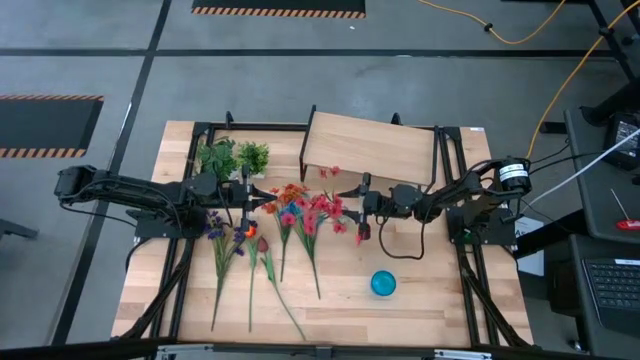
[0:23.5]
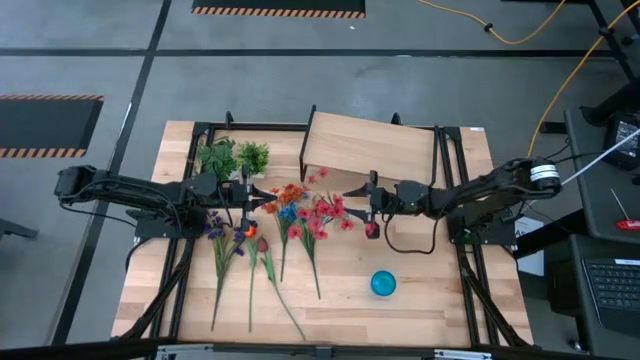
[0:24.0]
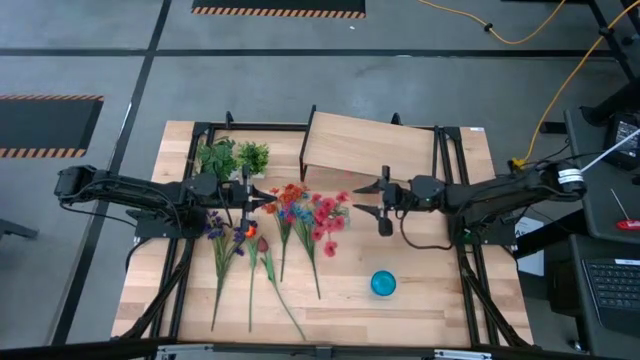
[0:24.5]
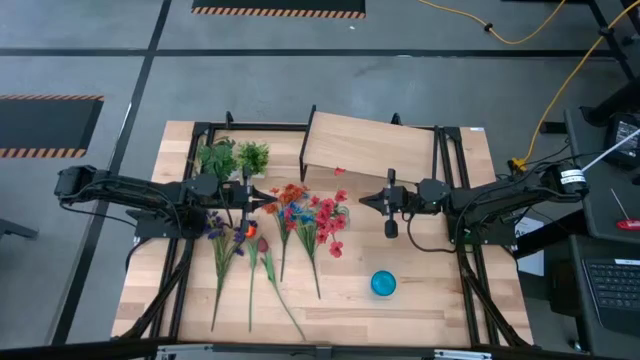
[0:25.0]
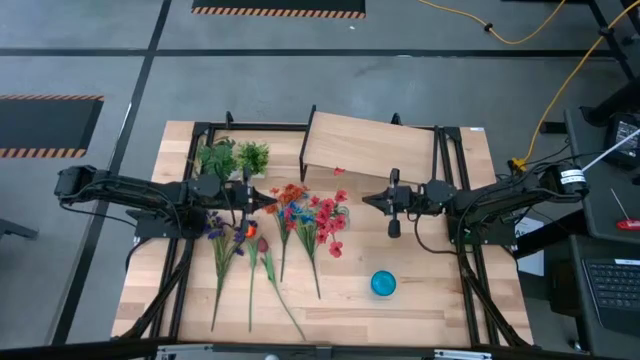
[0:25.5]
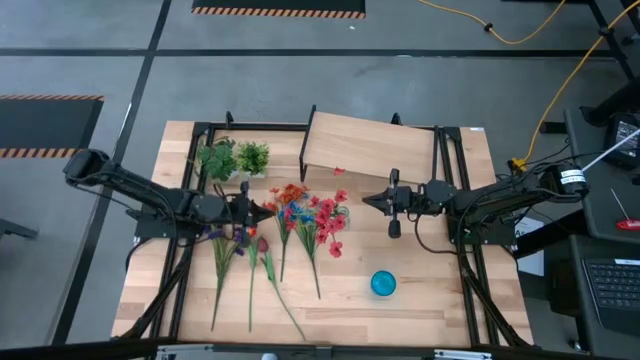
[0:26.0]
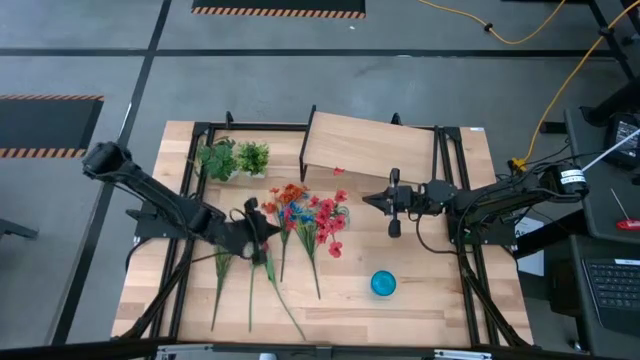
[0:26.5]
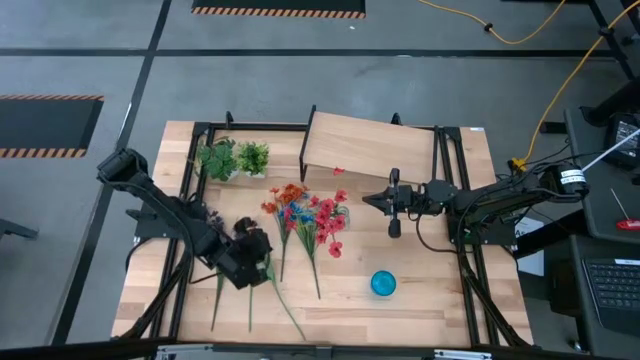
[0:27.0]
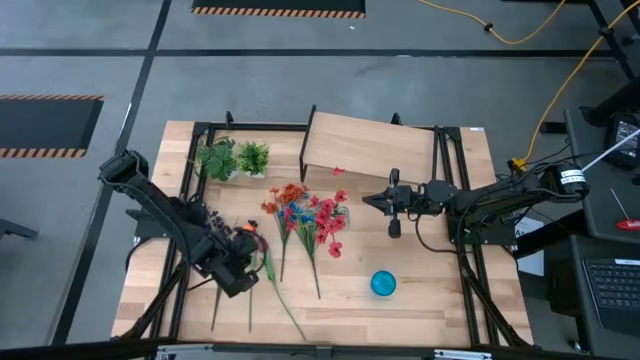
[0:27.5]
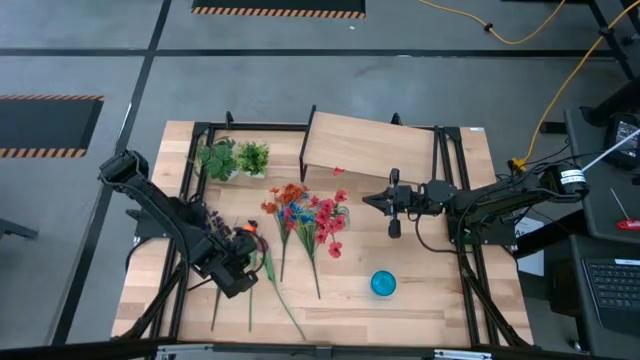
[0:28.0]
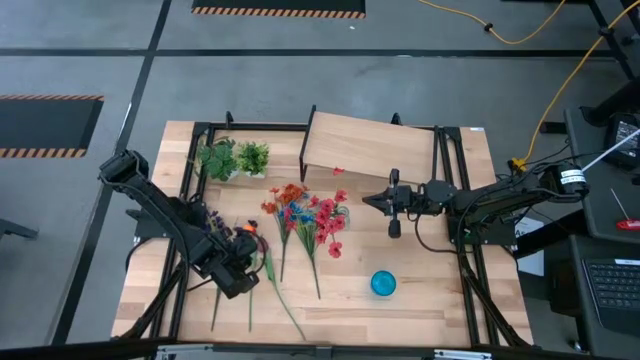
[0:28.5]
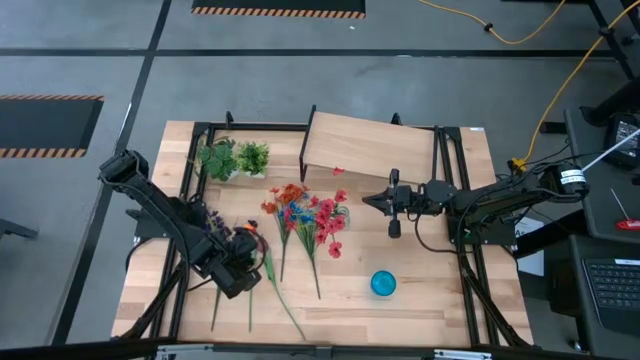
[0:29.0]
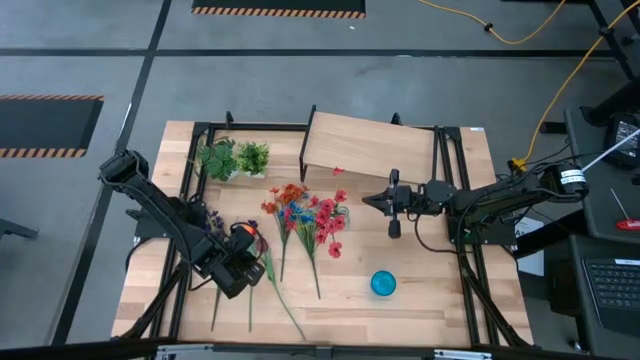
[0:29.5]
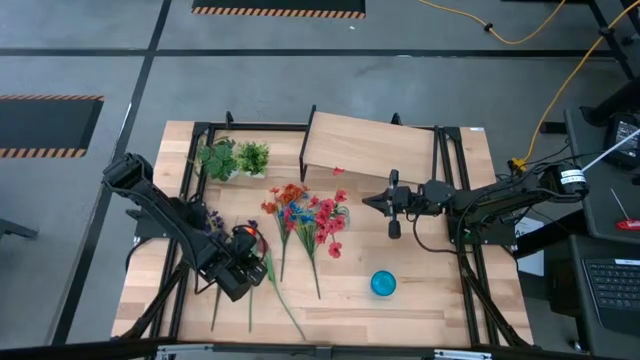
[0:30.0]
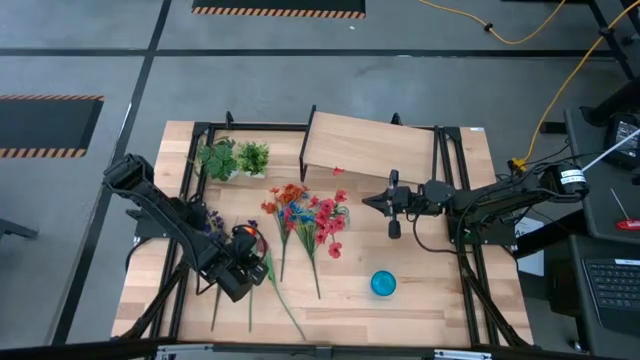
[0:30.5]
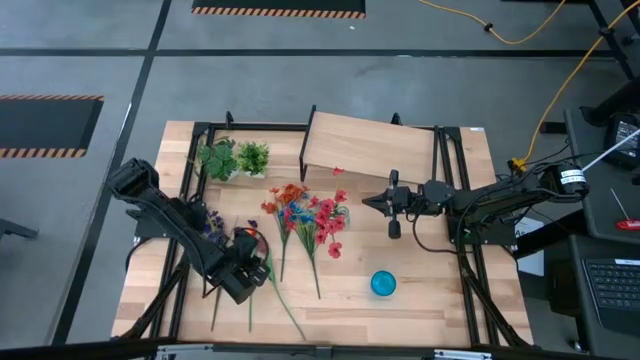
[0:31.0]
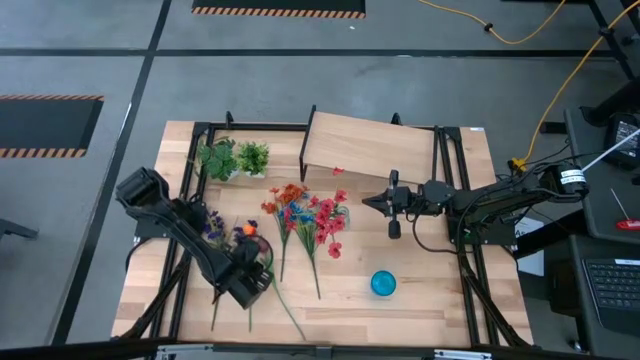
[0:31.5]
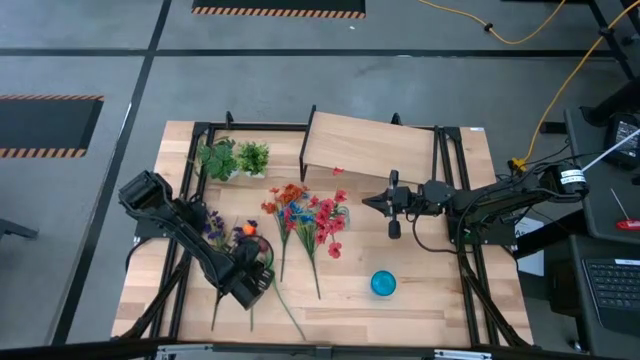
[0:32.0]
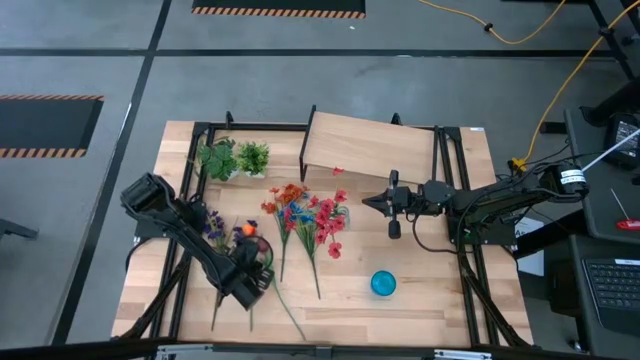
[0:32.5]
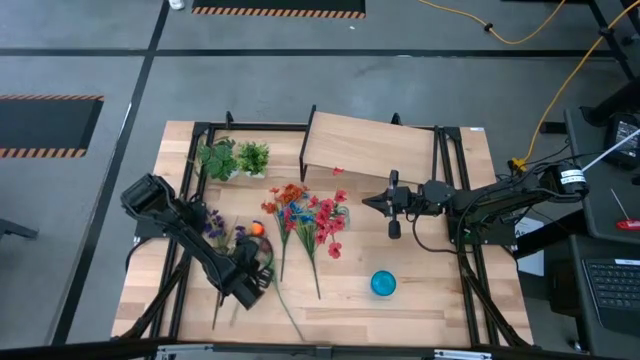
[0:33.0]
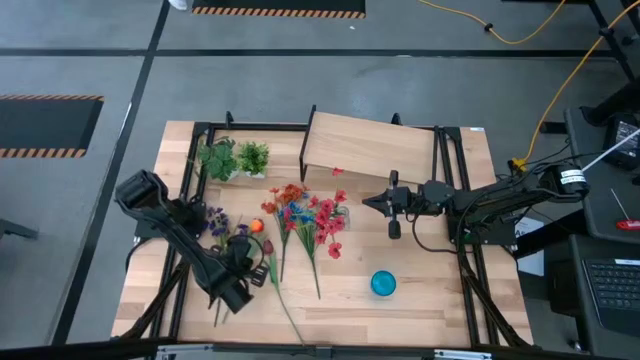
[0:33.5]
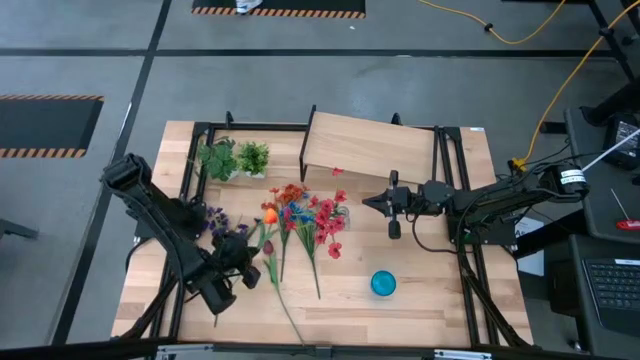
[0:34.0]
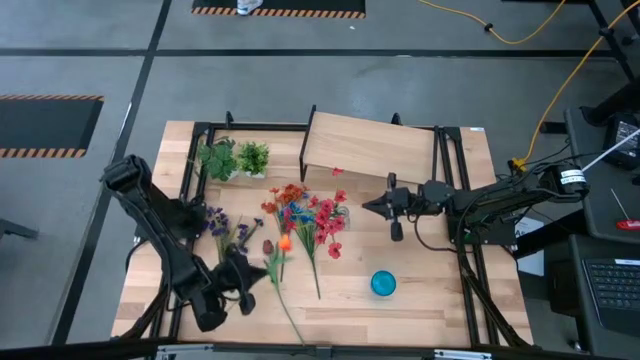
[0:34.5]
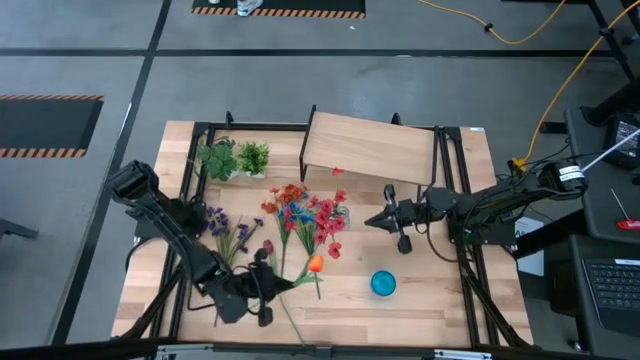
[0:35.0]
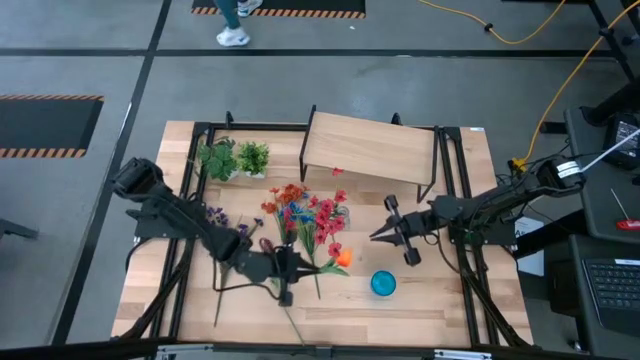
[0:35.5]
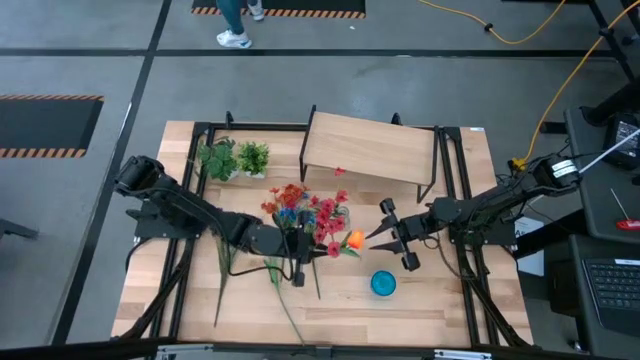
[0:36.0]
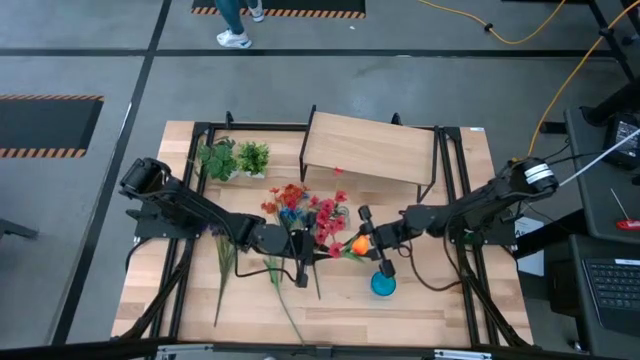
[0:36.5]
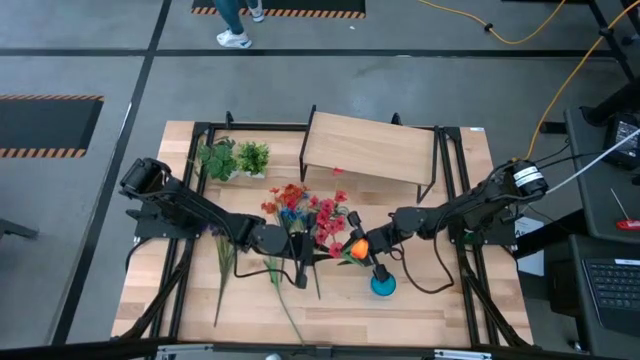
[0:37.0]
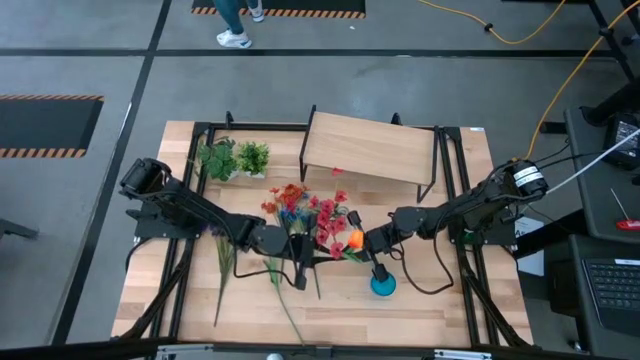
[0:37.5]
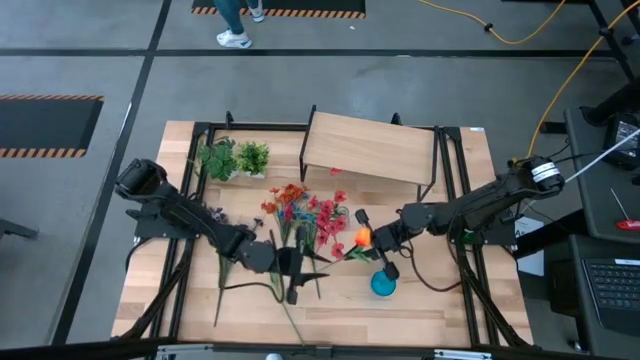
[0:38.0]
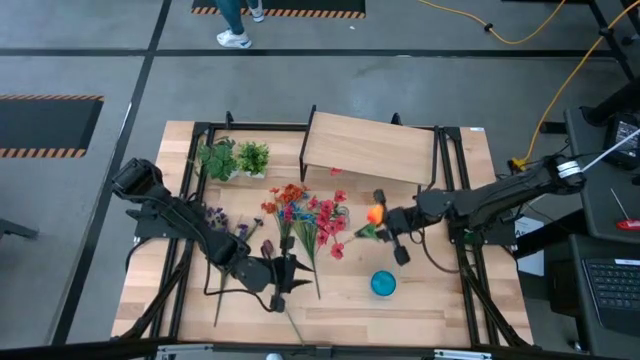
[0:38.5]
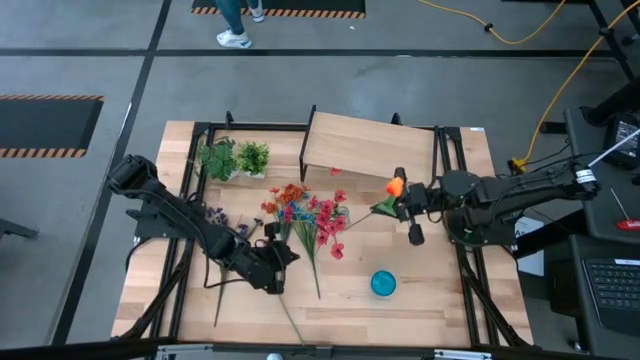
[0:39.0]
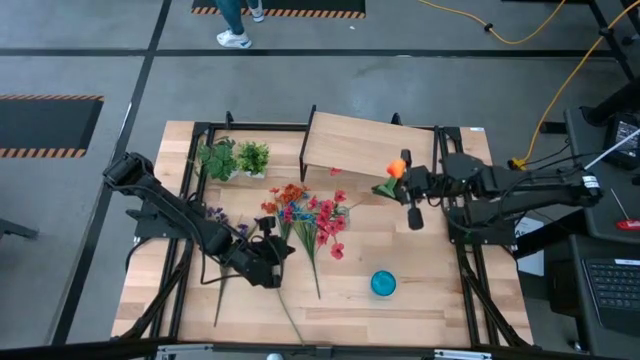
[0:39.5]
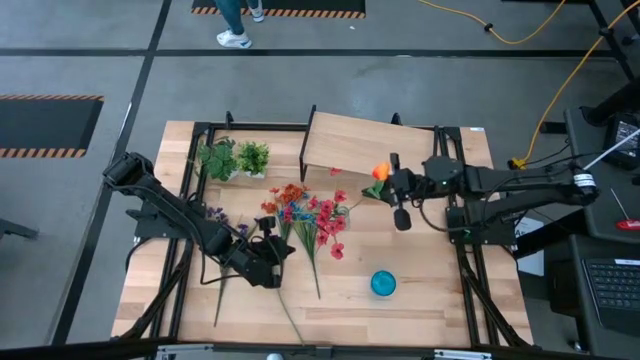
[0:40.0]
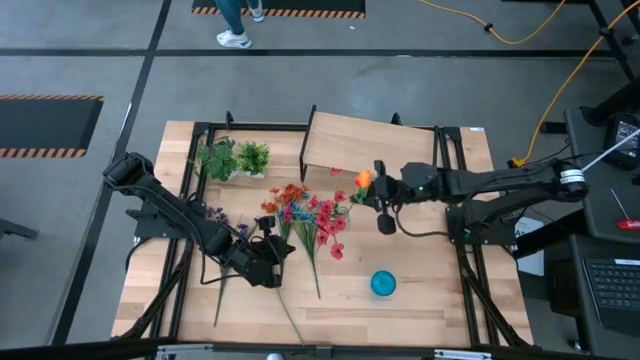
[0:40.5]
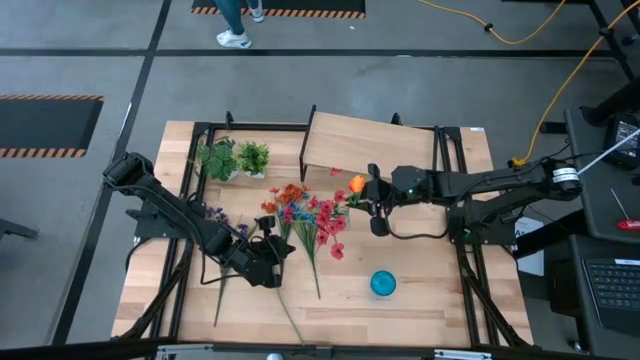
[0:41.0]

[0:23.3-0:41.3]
Task: Pick and place flowers into a vace then onto a shelf
Put the orange tulip into the transparent vase
